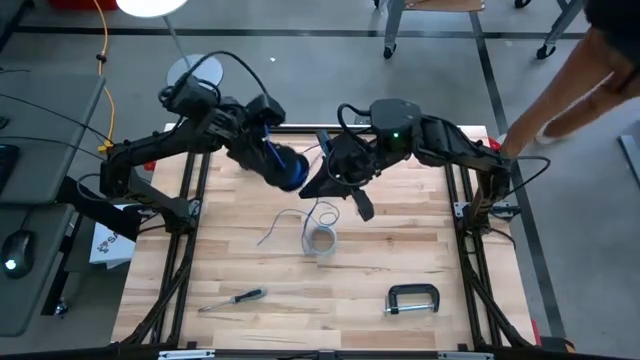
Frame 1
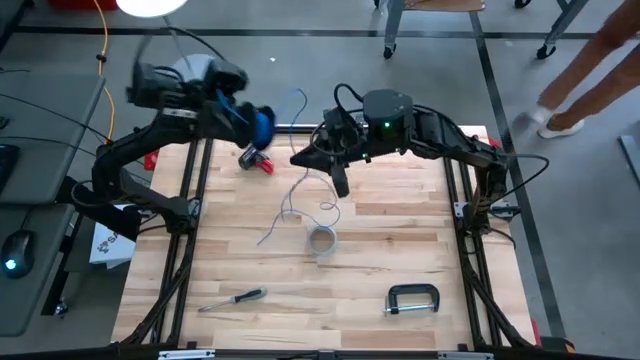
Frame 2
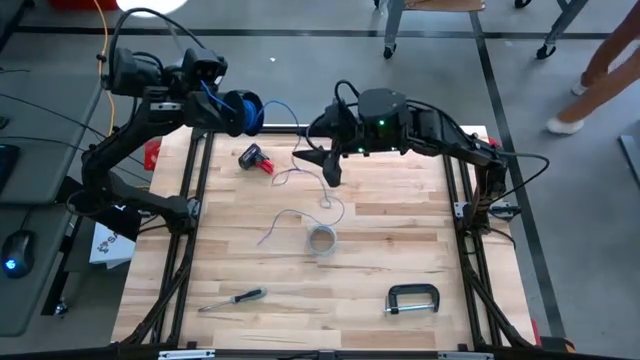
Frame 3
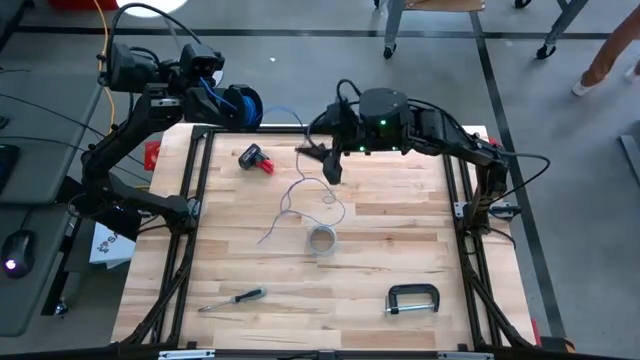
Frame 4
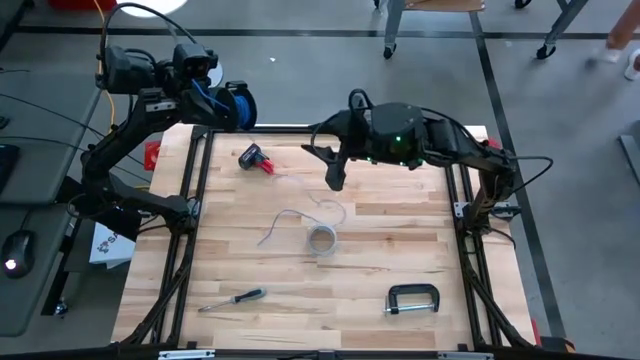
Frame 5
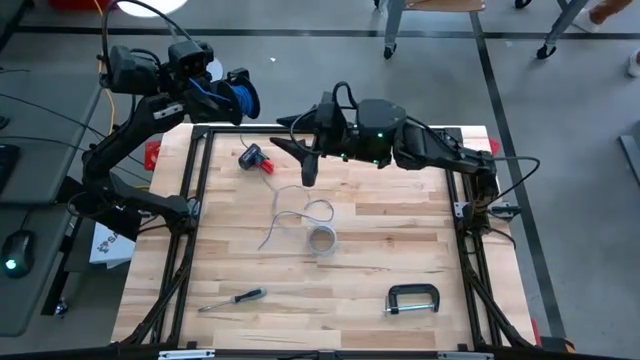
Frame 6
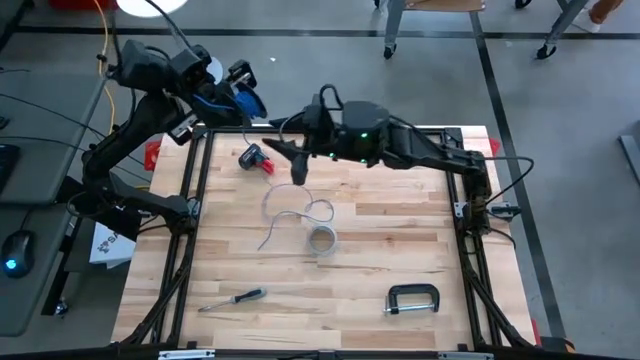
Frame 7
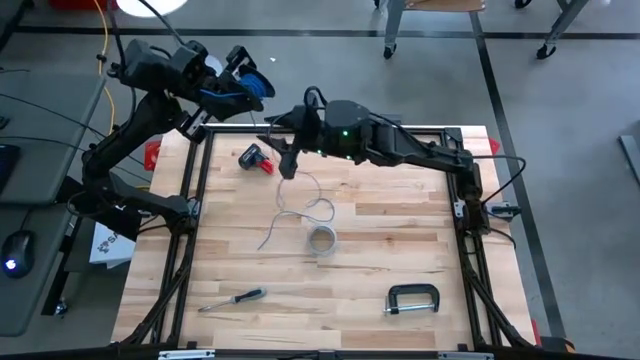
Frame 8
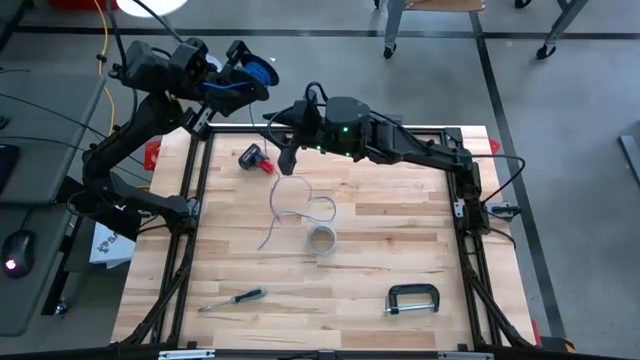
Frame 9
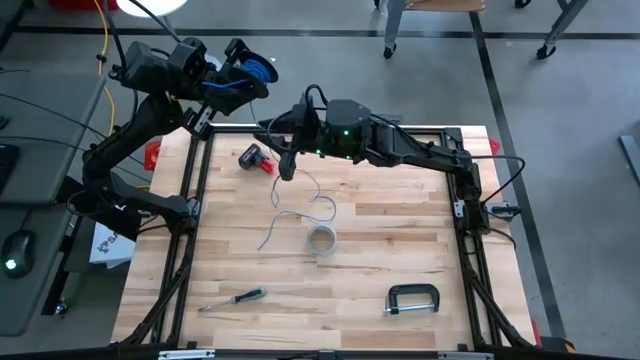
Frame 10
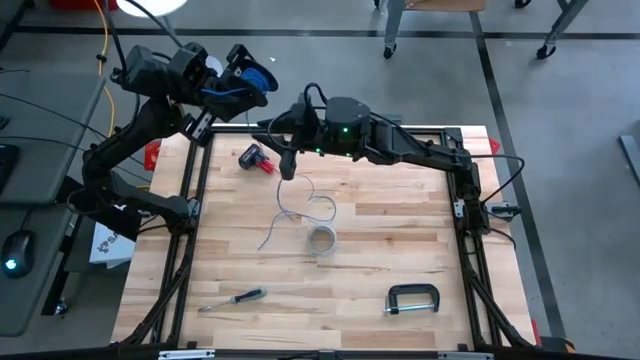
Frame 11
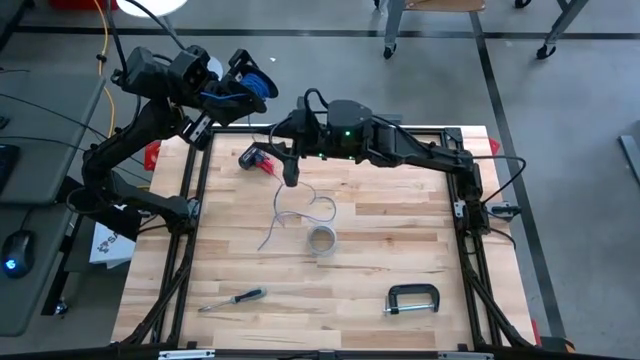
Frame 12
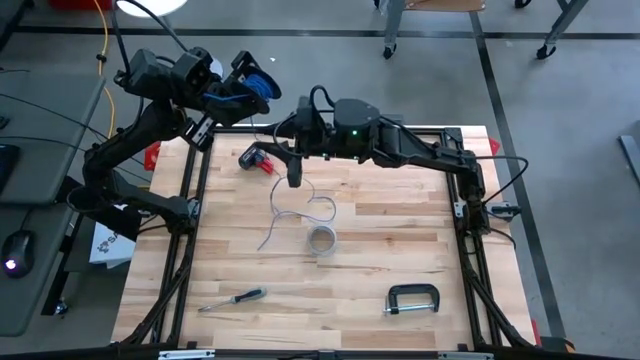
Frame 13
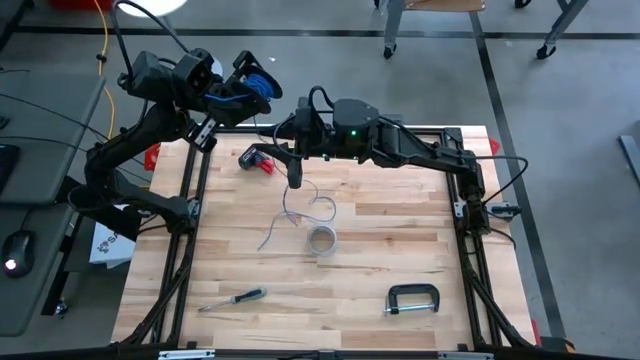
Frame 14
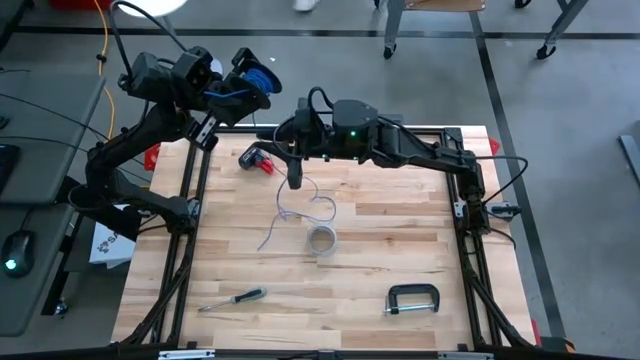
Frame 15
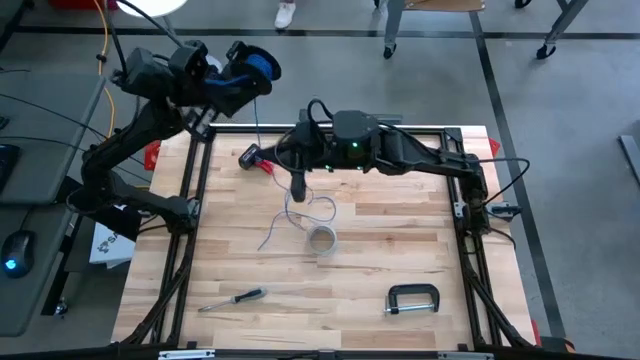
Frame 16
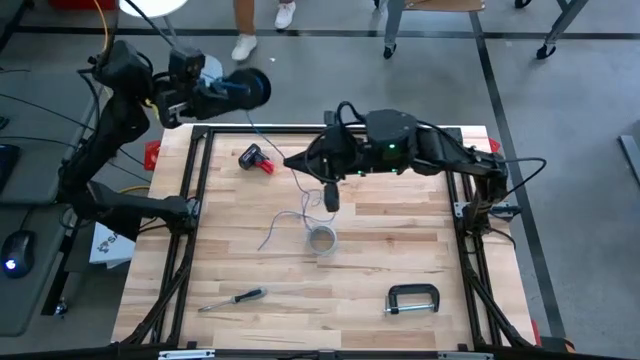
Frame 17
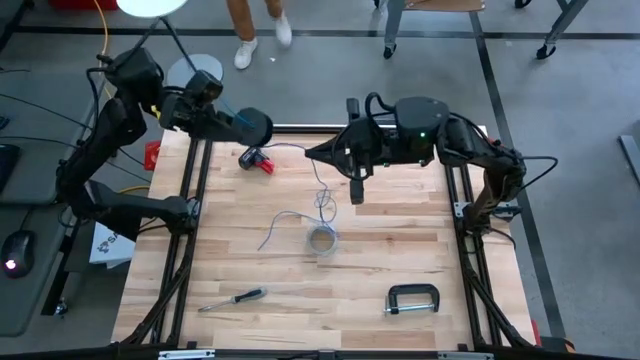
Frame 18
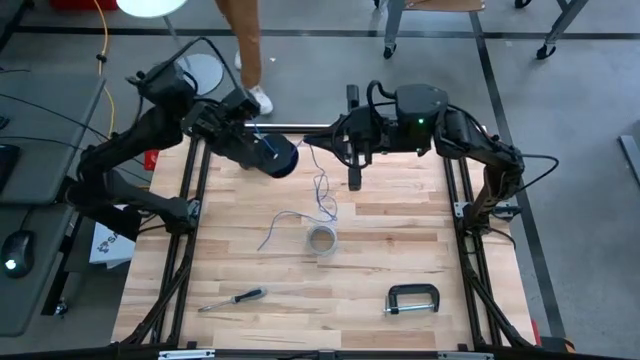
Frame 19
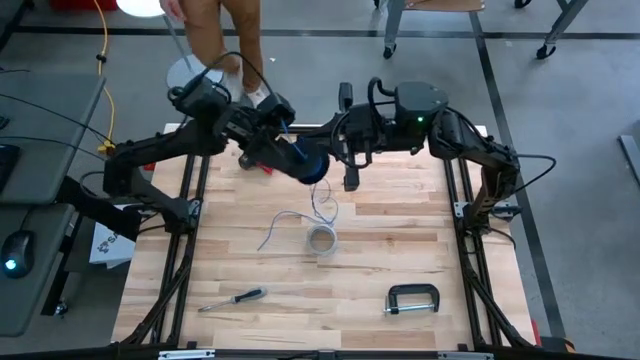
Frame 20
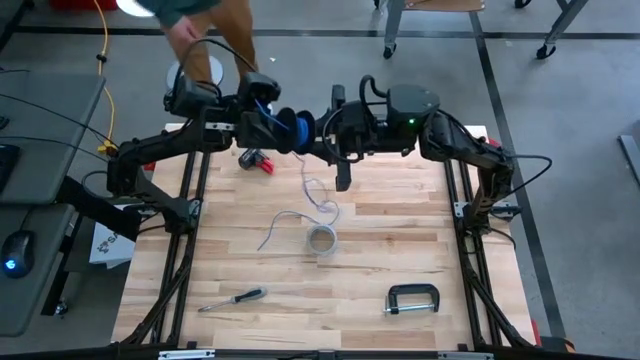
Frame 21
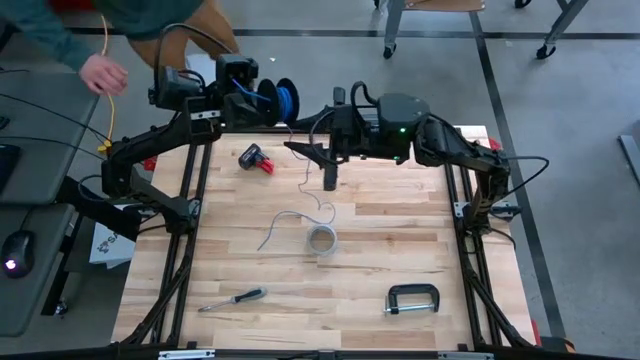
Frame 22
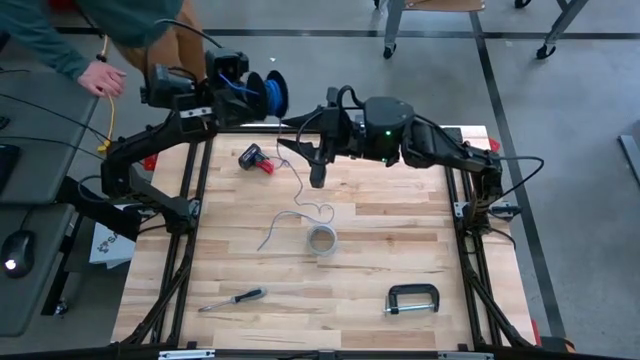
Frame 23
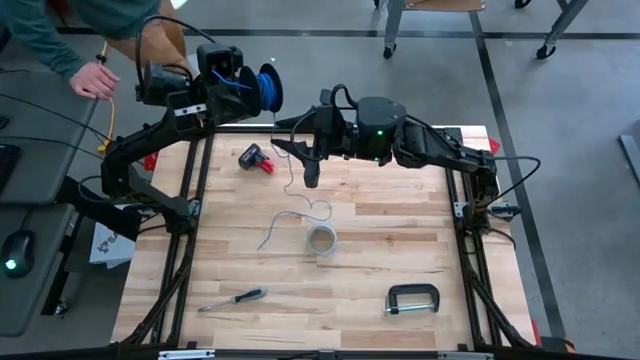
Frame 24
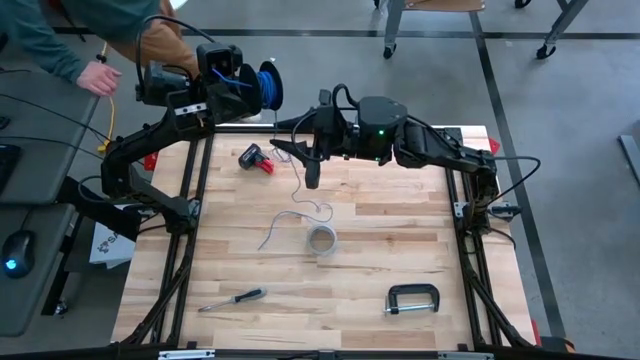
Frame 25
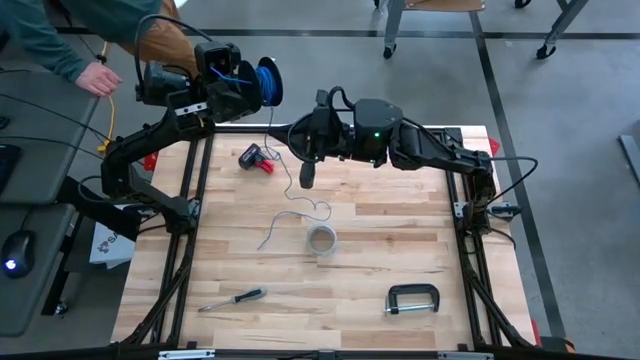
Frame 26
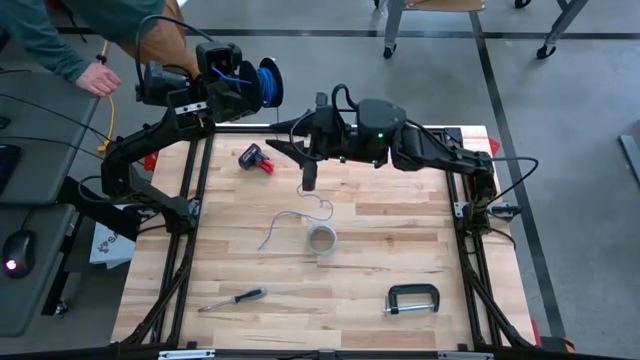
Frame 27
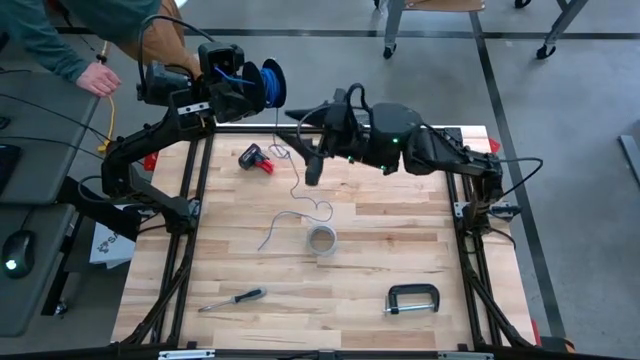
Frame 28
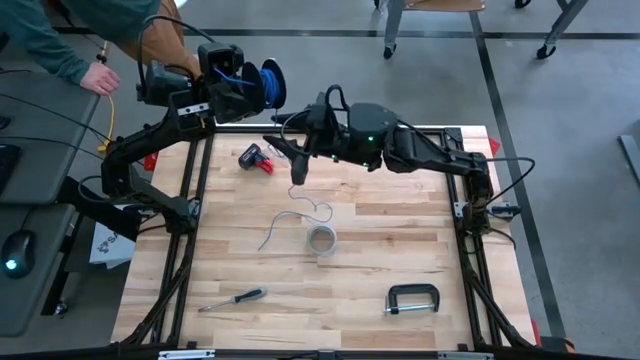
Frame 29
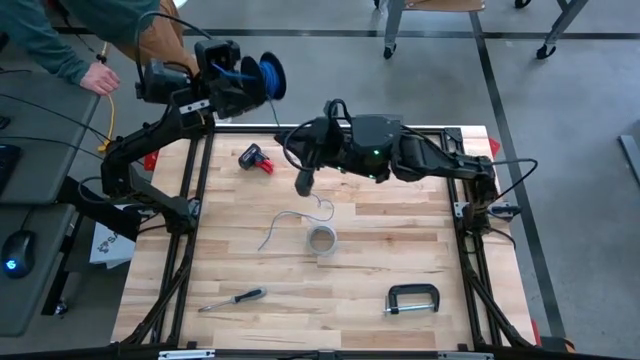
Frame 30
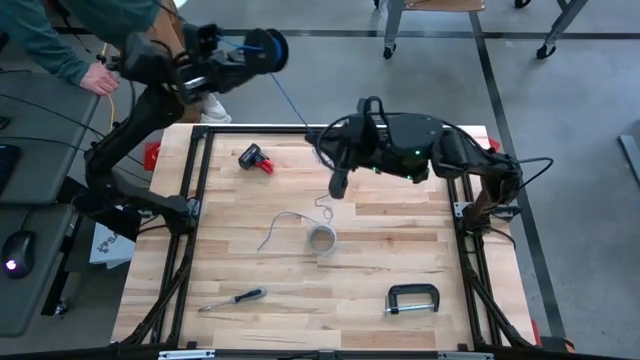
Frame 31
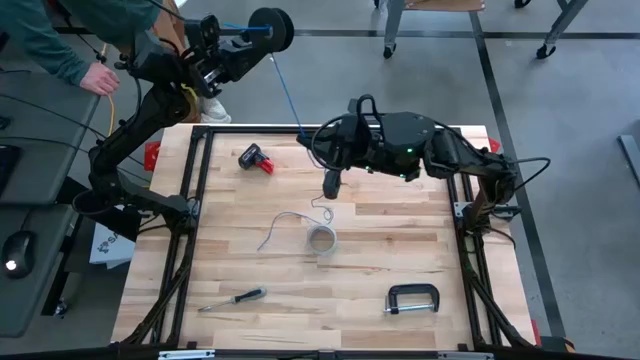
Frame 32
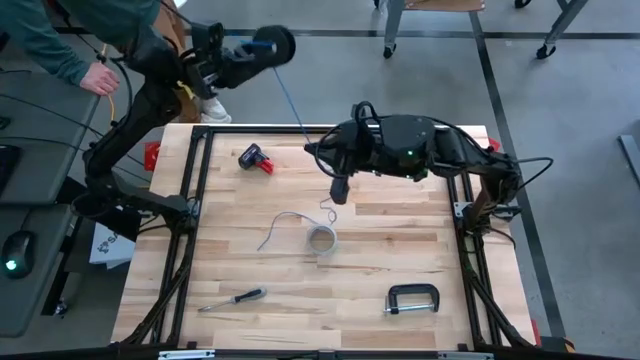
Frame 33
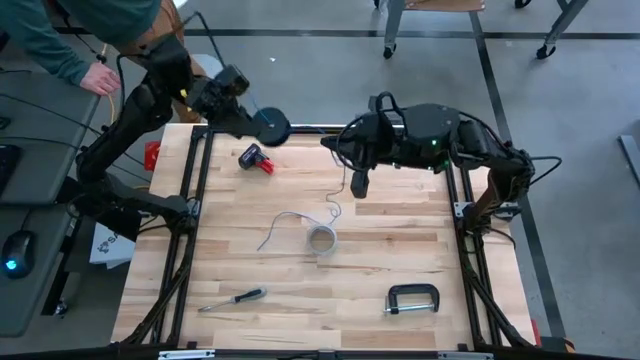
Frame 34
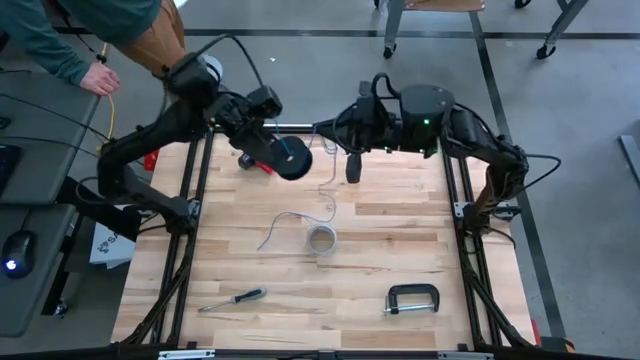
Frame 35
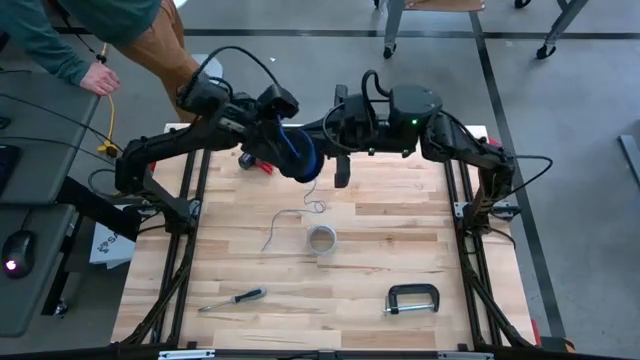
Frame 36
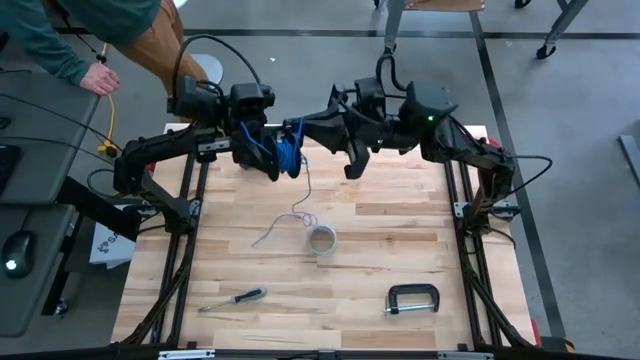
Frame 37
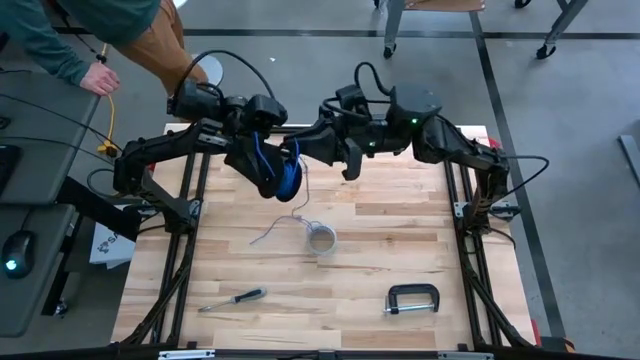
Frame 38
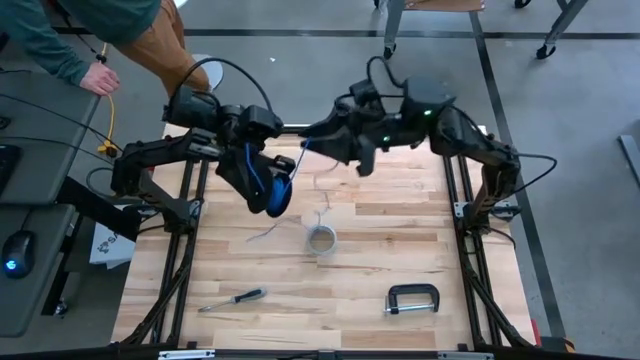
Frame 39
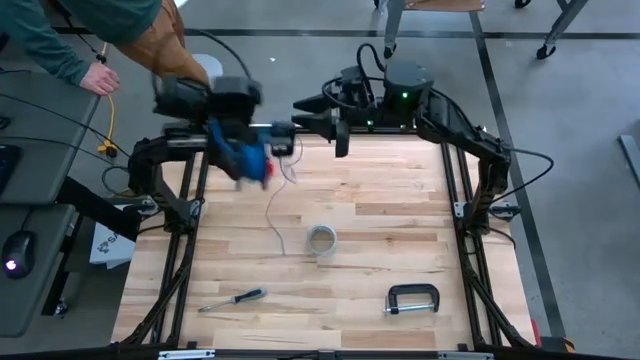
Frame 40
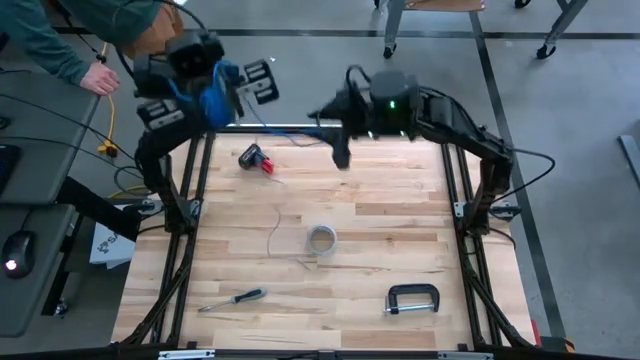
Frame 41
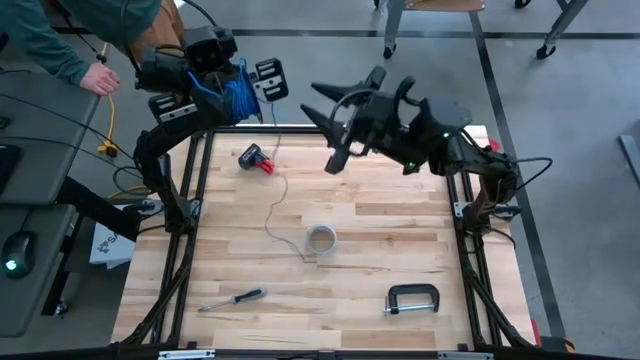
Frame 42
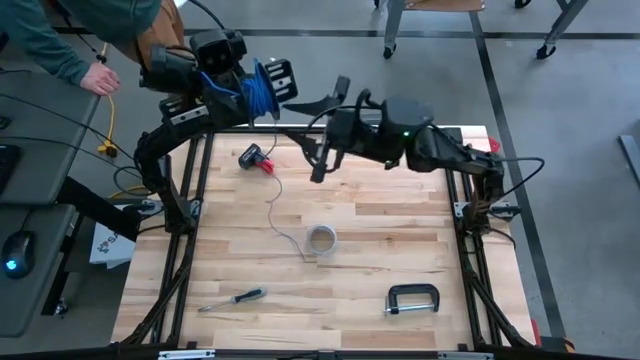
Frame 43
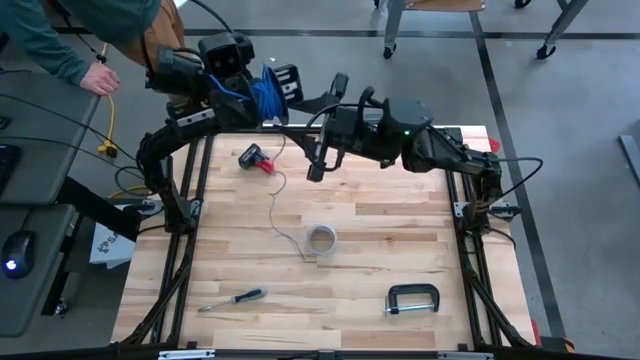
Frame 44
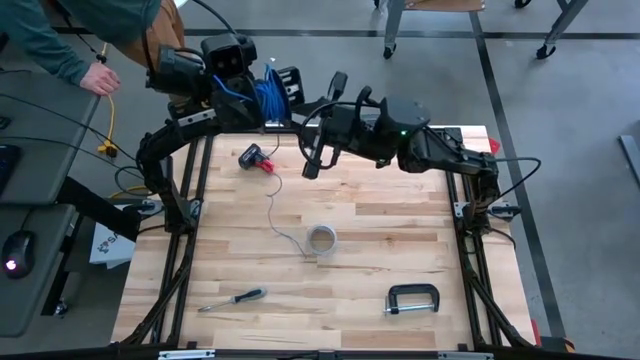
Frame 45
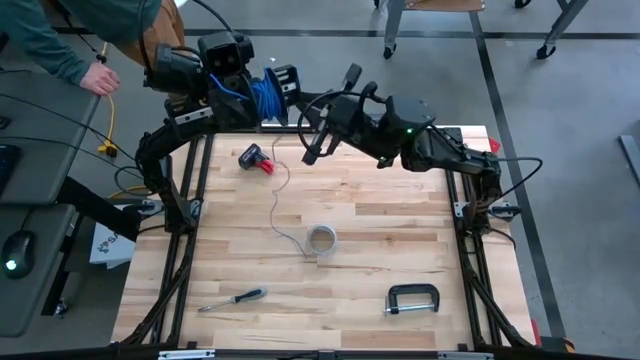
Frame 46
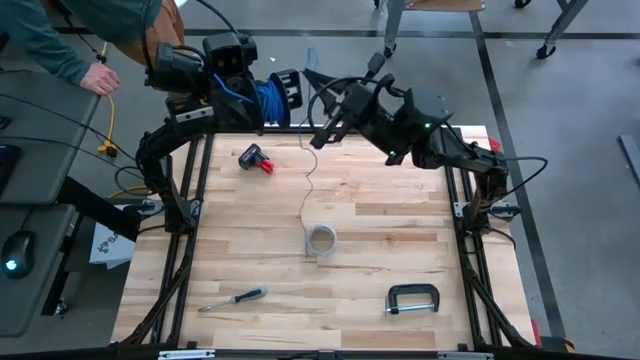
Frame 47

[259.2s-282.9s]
Task: Coil cords
Coil the blue wire on the spool
